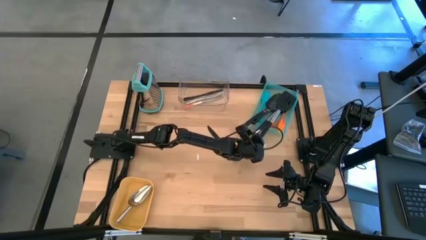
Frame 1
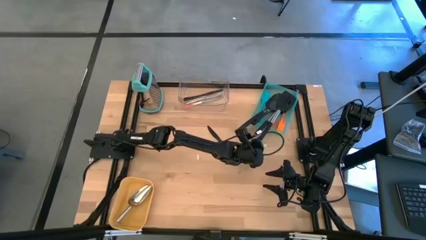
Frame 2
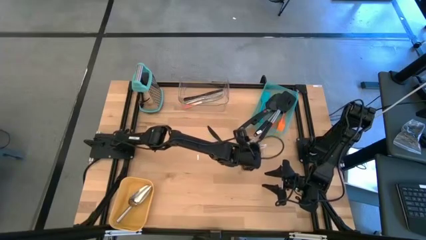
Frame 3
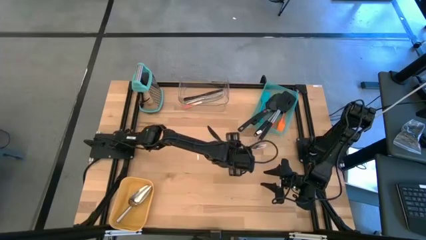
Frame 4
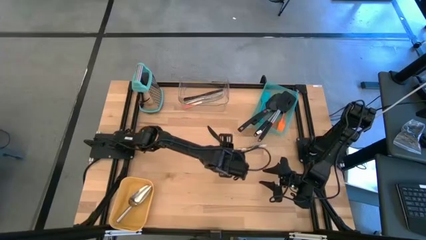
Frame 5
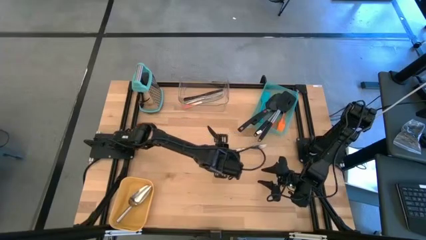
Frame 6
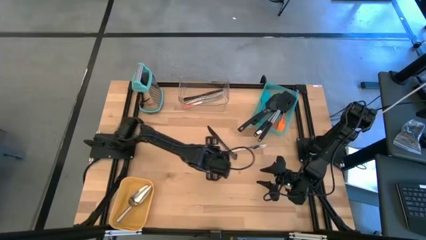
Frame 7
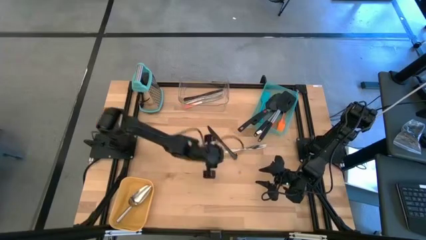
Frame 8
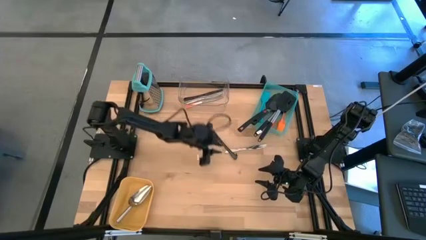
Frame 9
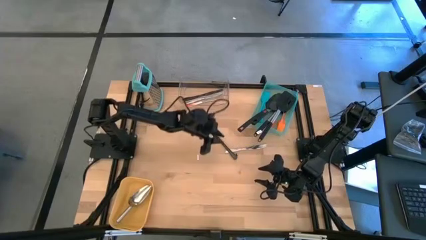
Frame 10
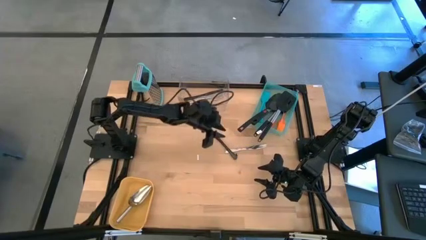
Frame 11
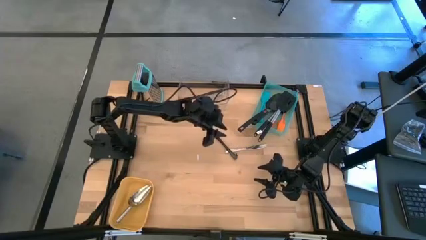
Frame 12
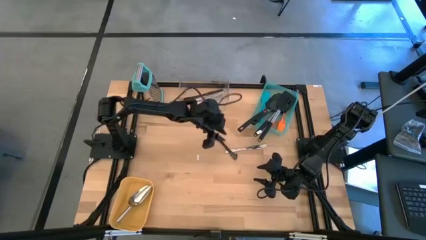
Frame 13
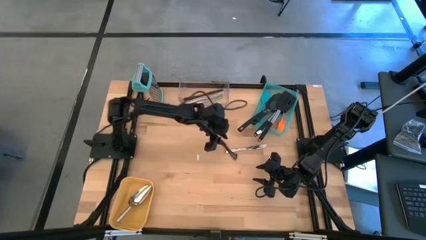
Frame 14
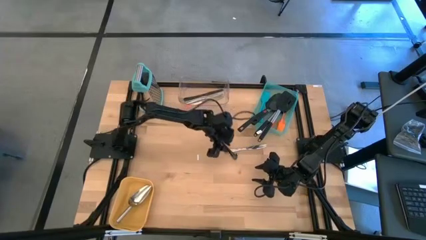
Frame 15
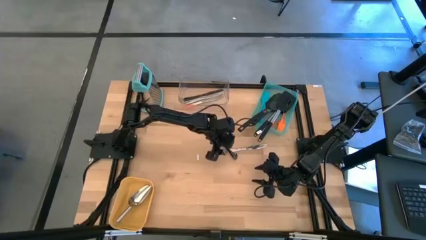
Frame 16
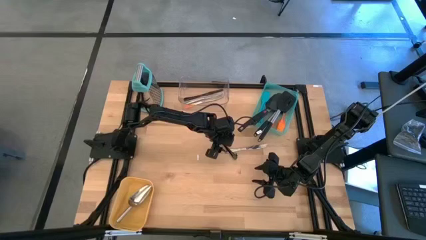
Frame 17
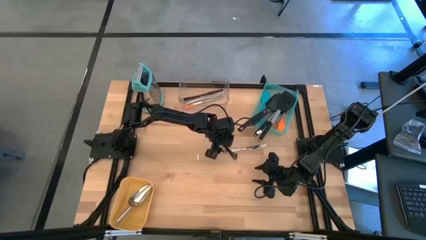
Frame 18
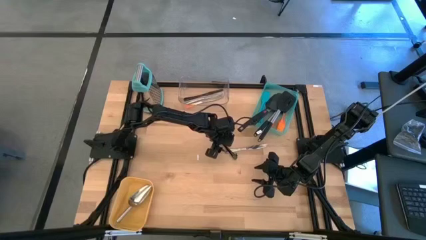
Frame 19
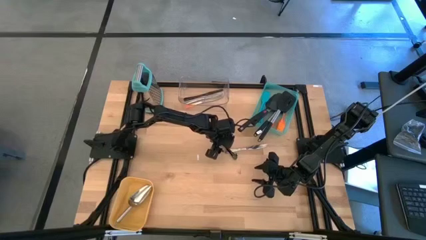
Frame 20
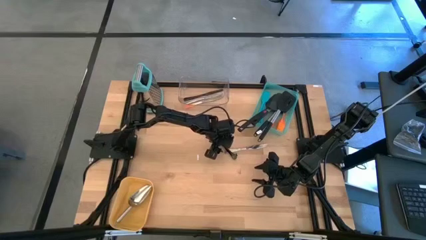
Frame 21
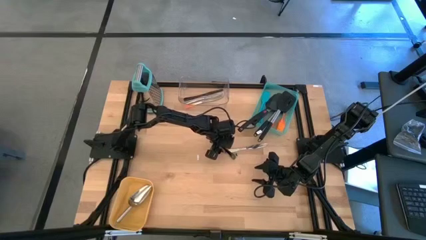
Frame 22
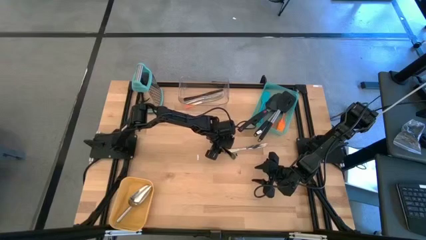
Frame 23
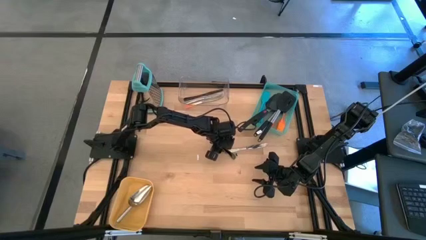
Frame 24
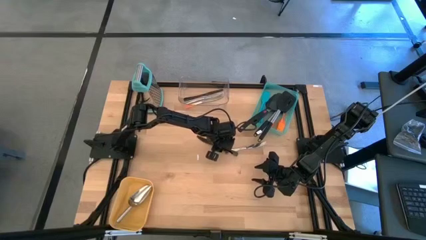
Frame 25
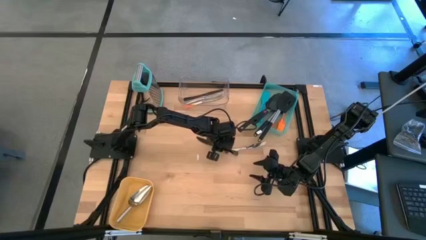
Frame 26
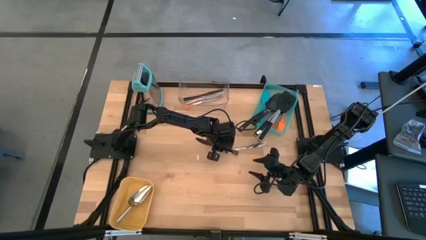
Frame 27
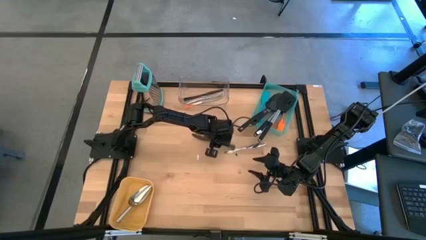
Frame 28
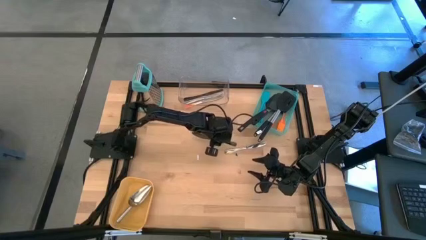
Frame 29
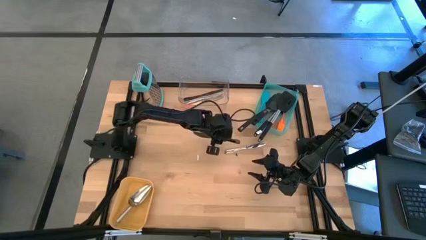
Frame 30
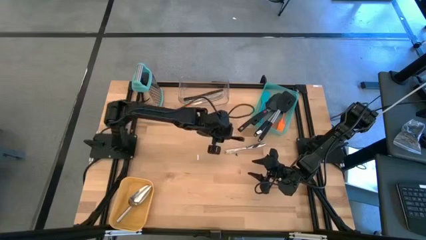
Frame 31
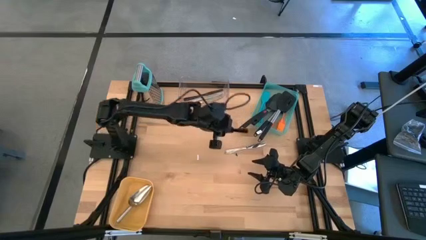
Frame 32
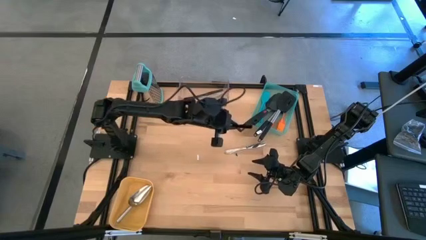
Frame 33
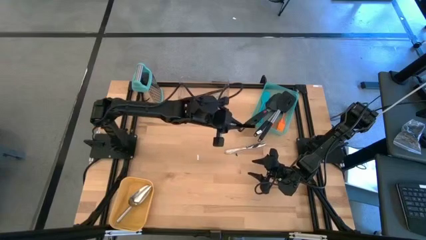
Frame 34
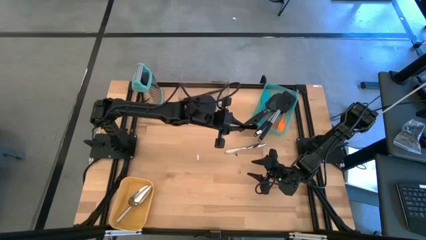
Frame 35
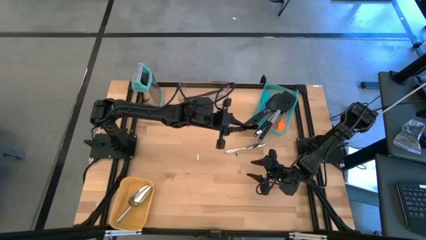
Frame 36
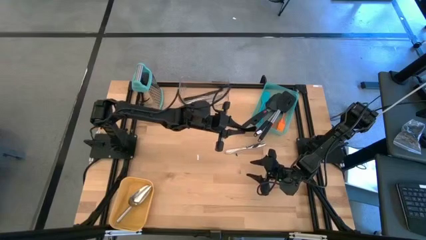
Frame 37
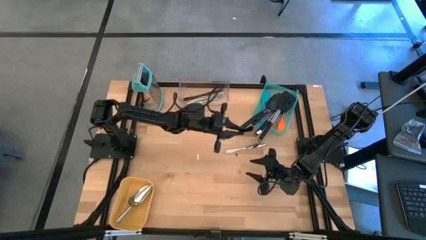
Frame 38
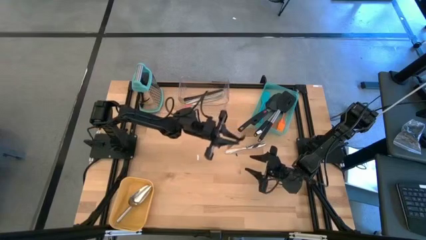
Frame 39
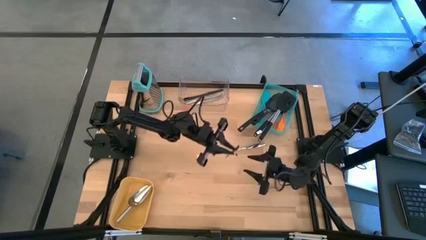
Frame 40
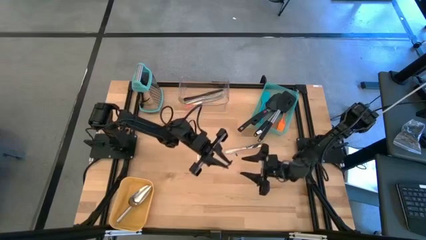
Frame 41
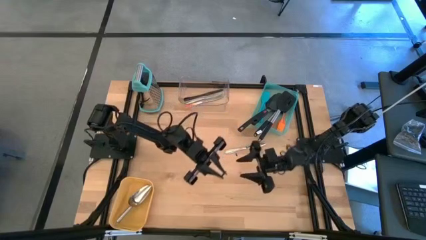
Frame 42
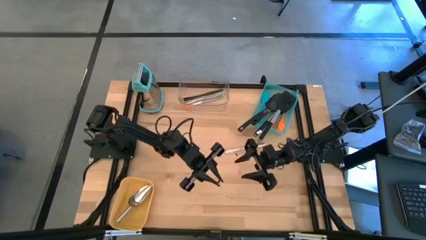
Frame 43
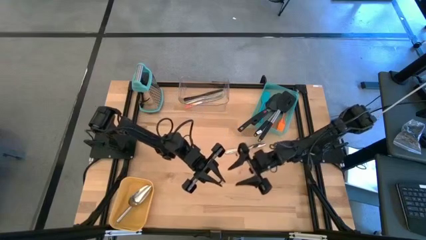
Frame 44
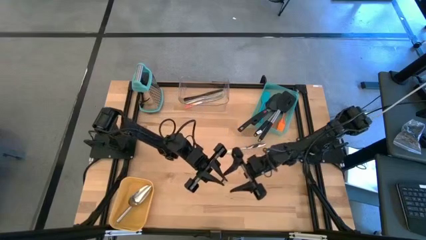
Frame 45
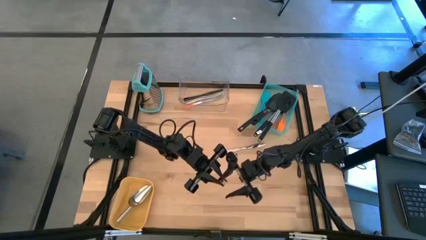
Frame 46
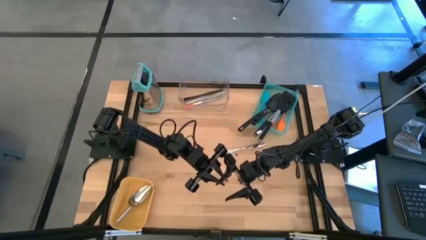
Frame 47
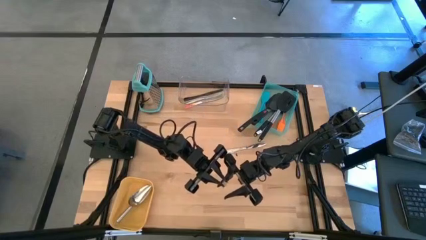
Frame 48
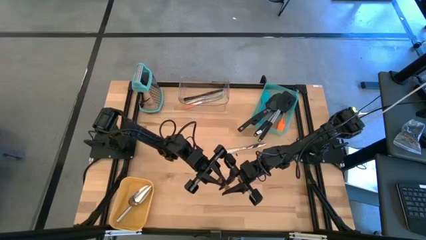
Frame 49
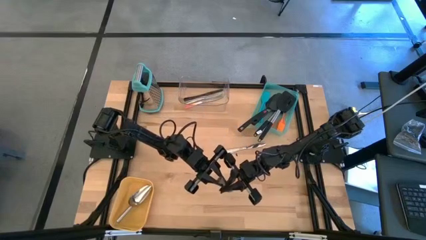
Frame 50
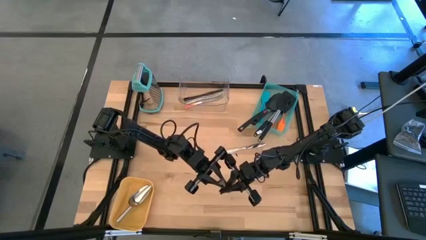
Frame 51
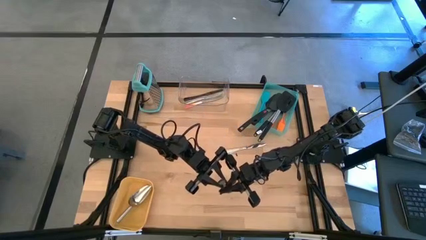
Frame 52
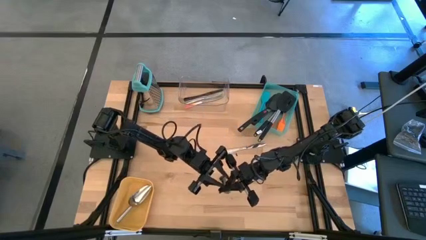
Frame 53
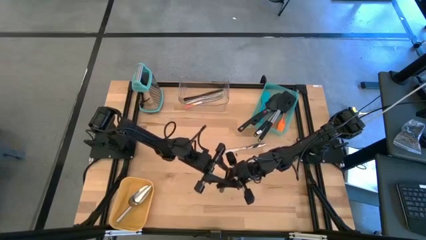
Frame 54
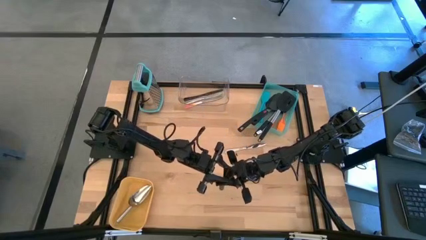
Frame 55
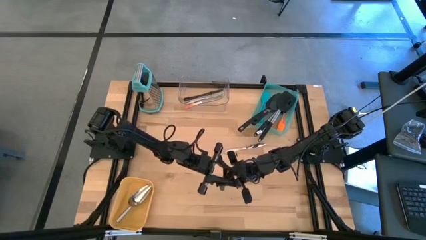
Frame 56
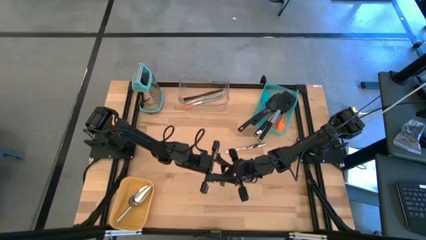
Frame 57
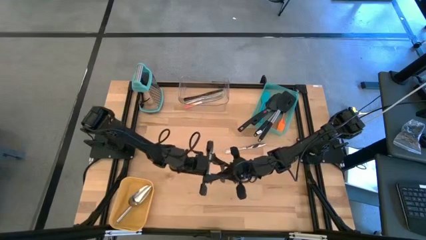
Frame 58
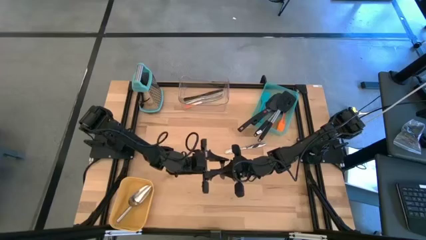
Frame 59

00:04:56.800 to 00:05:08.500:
Task: Pick & Place Kitchen Items
Put the black table knife into the transparent bin

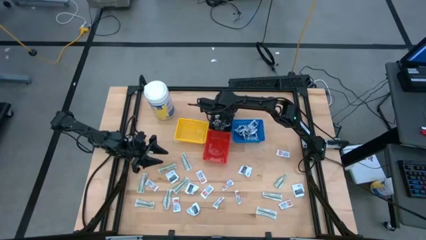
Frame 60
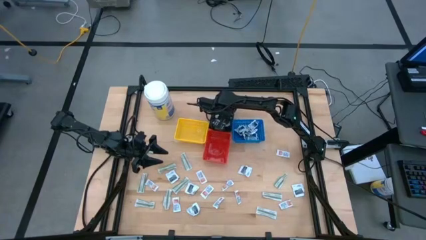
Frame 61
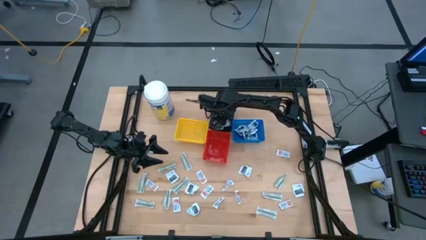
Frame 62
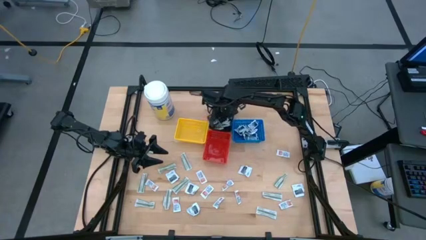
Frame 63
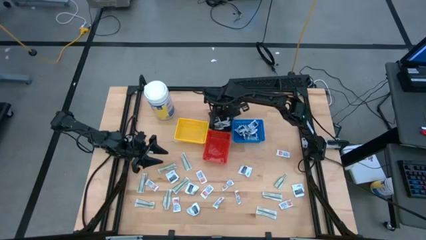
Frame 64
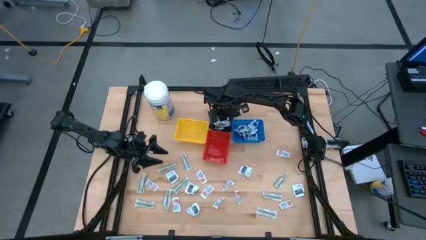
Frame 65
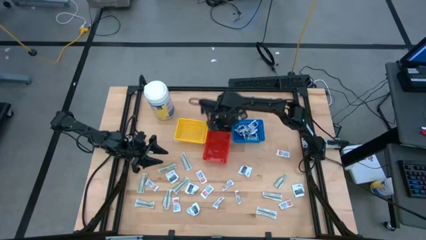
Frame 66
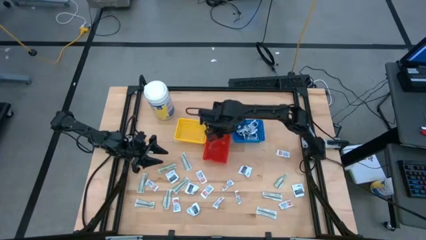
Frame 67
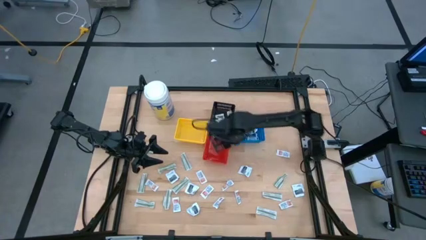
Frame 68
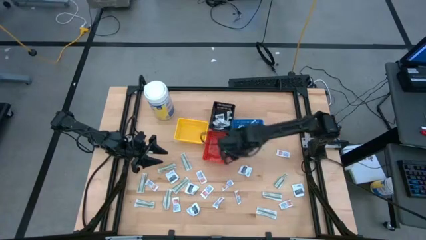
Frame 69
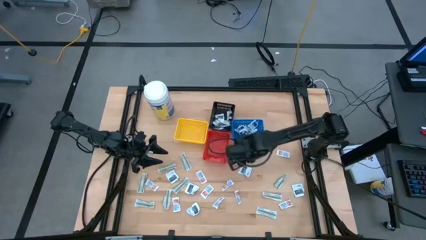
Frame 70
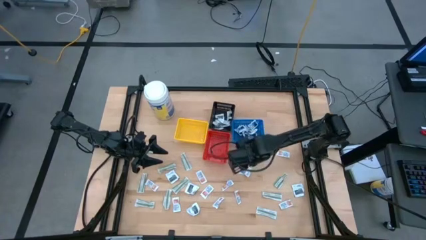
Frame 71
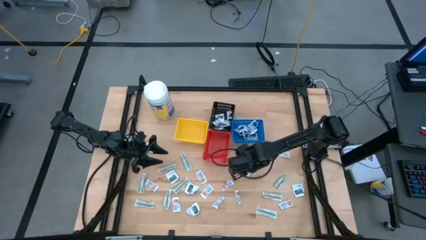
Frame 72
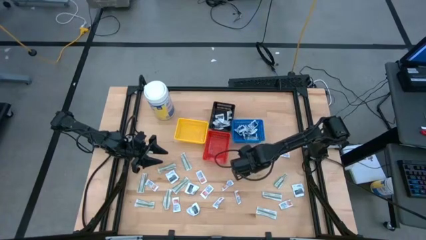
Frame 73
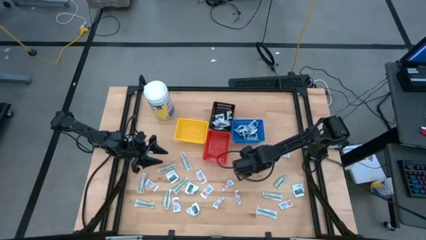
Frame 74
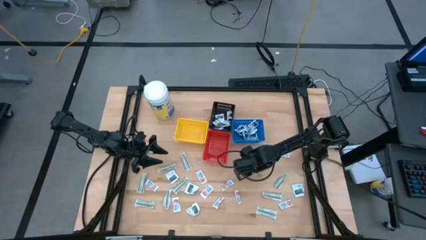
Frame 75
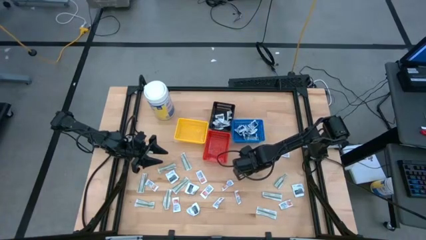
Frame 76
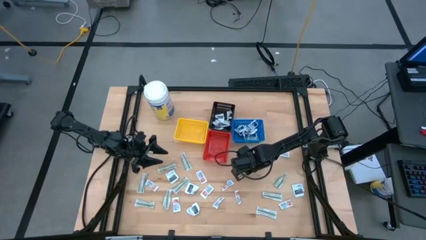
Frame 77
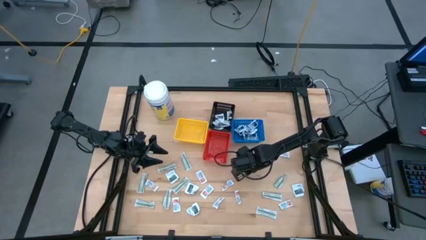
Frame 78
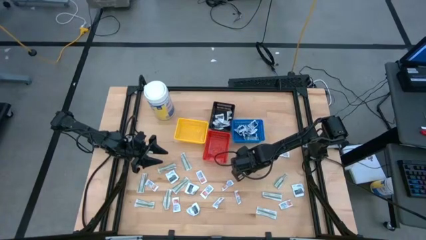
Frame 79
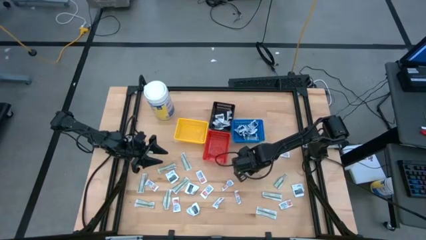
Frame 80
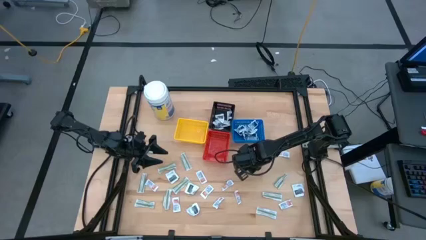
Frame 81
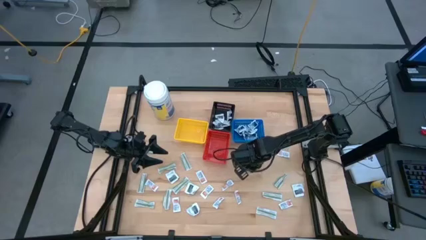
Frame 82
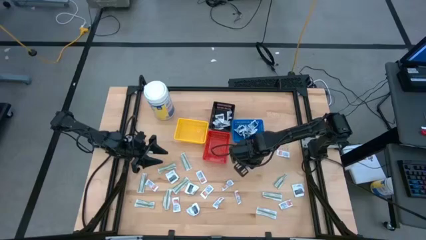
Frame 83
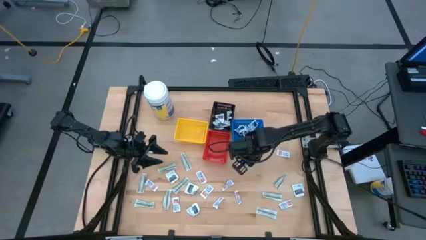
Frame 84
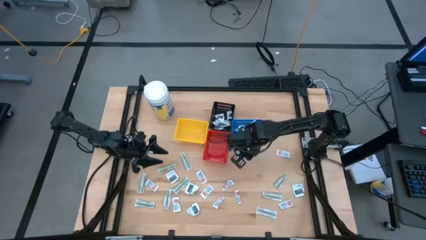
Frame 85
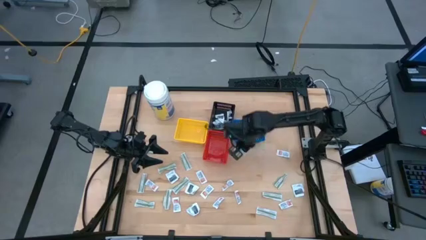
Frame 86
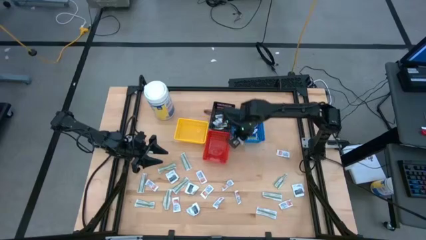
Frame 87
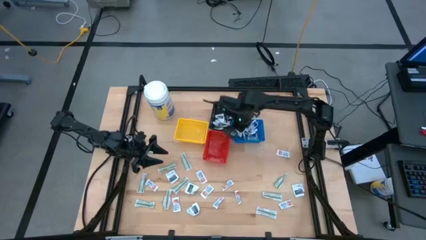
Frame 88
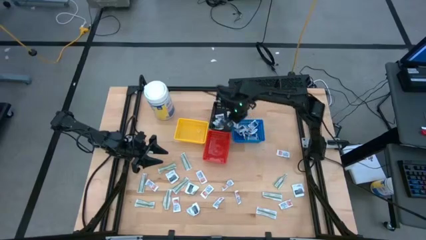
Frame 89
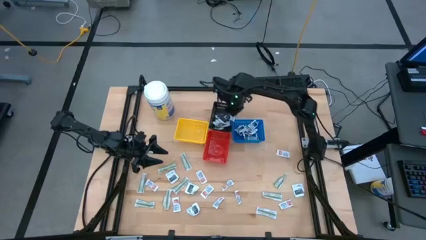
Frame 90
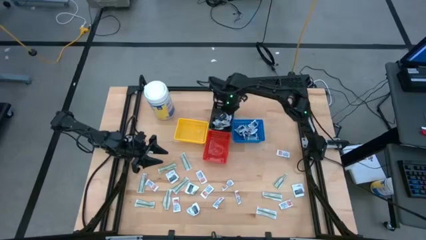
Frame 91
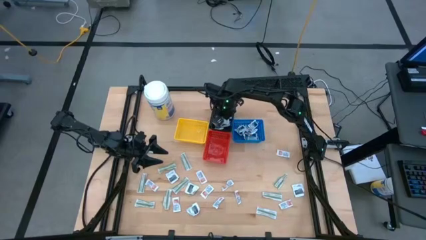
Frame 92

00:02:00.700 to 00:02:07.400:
Task: Pick & Place First Aid Supplies
Put the towelette pack into the black bin
